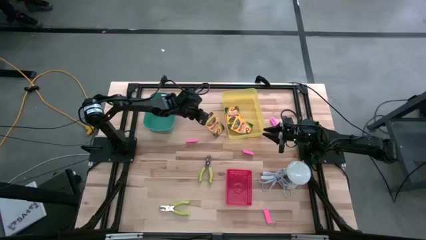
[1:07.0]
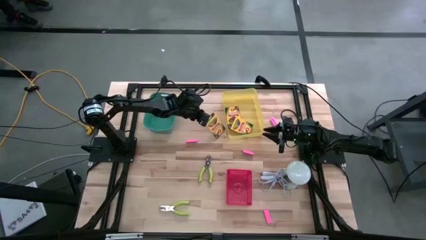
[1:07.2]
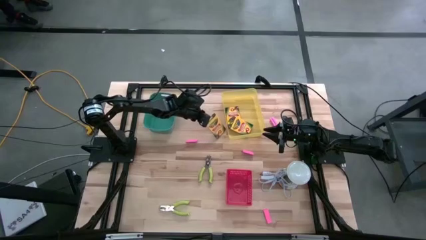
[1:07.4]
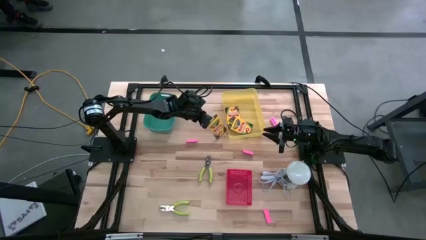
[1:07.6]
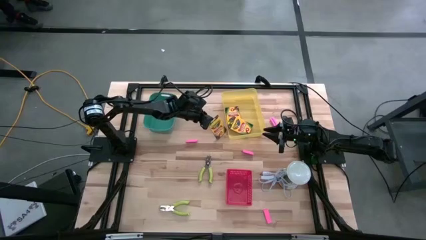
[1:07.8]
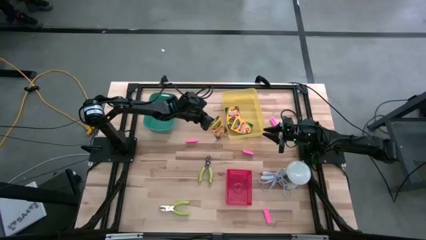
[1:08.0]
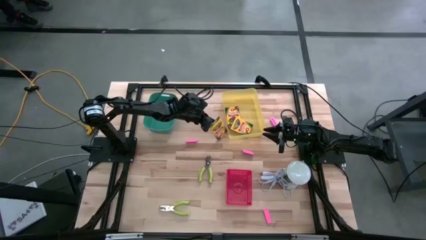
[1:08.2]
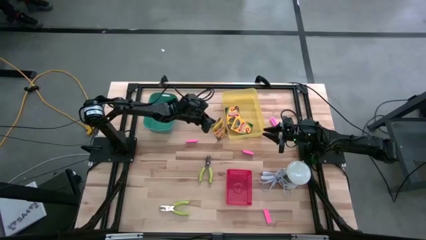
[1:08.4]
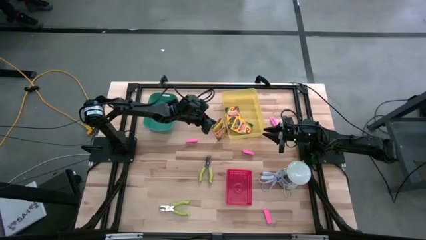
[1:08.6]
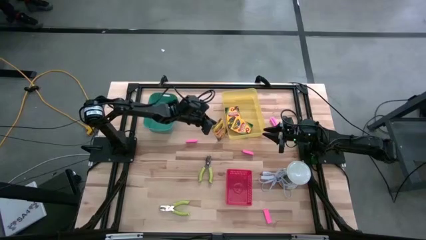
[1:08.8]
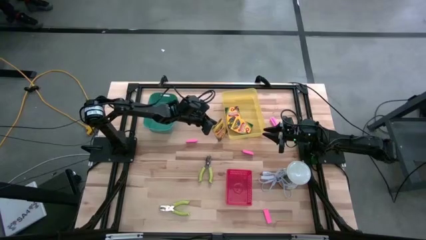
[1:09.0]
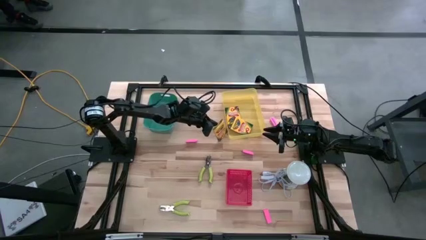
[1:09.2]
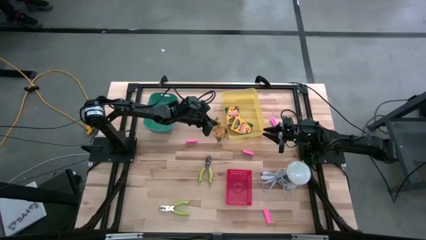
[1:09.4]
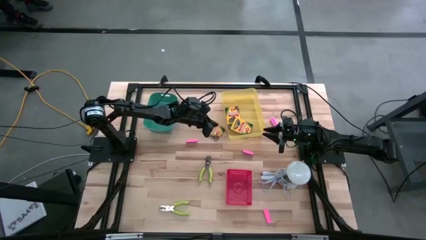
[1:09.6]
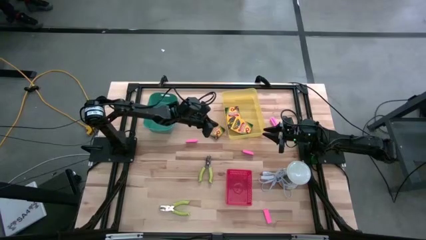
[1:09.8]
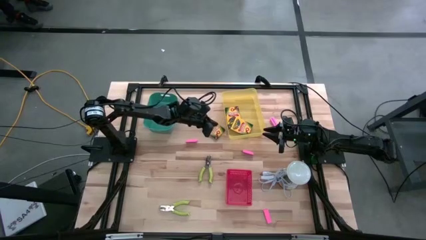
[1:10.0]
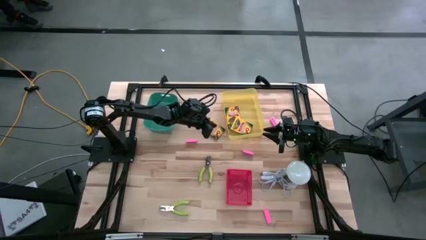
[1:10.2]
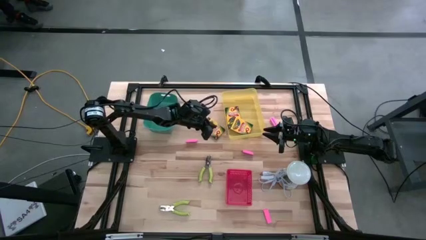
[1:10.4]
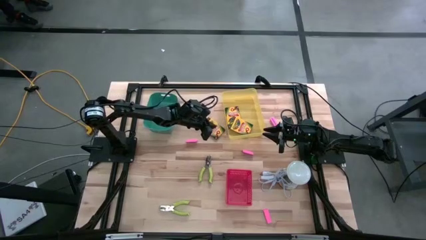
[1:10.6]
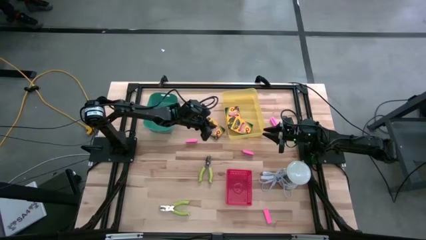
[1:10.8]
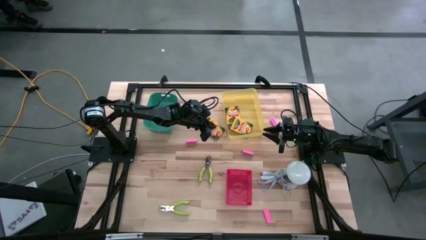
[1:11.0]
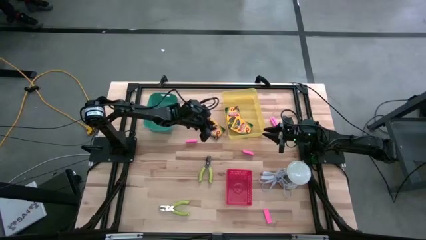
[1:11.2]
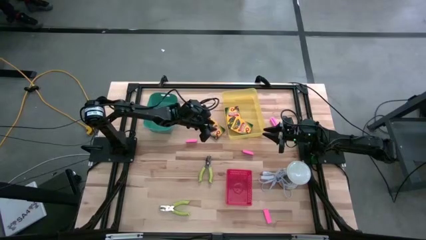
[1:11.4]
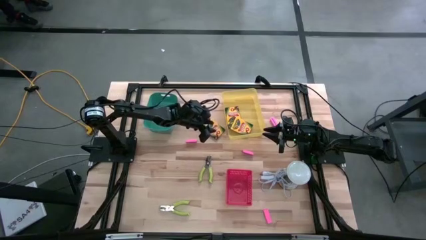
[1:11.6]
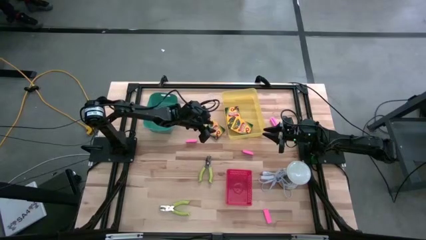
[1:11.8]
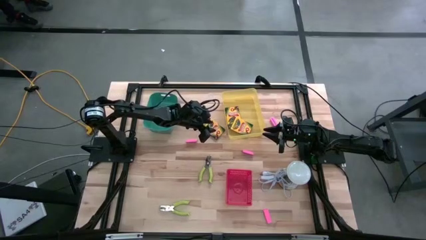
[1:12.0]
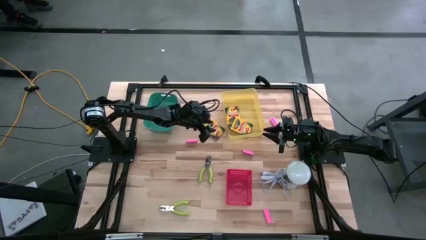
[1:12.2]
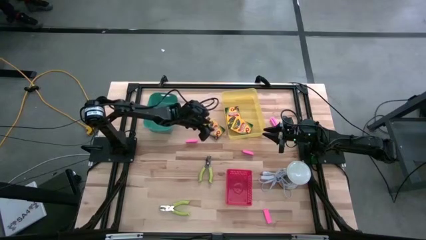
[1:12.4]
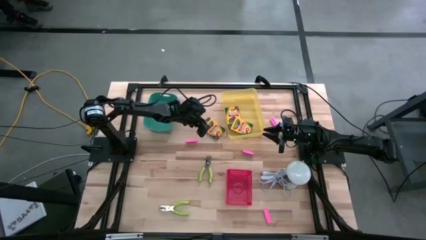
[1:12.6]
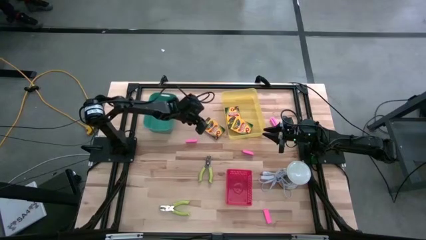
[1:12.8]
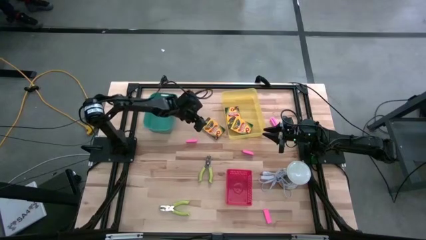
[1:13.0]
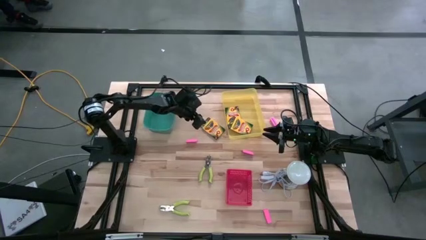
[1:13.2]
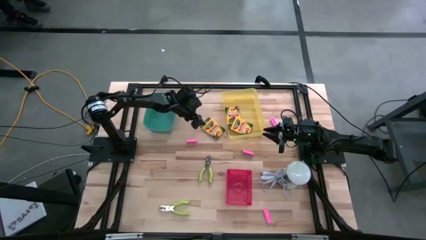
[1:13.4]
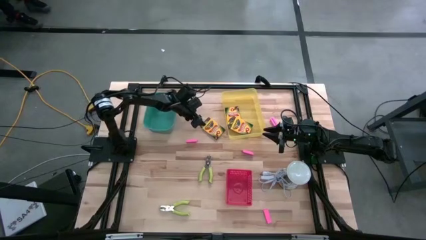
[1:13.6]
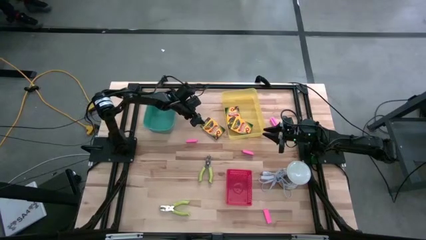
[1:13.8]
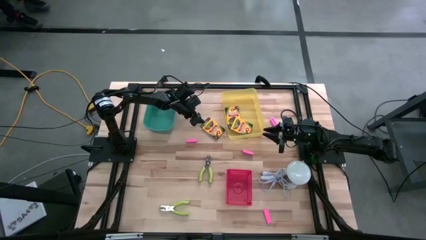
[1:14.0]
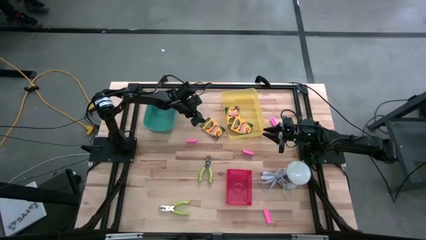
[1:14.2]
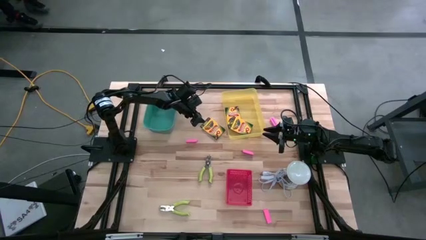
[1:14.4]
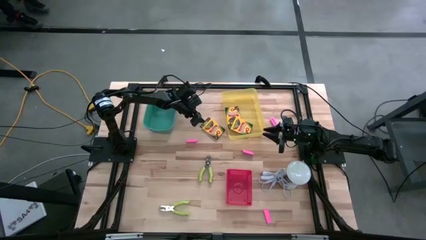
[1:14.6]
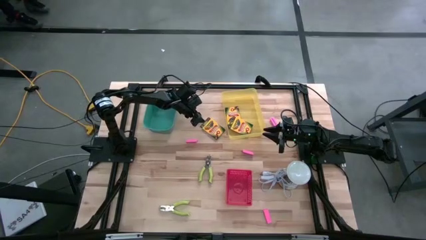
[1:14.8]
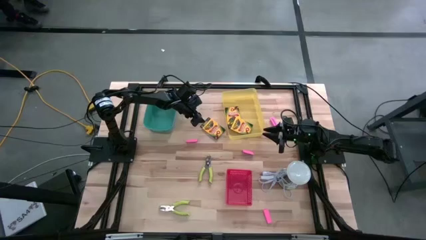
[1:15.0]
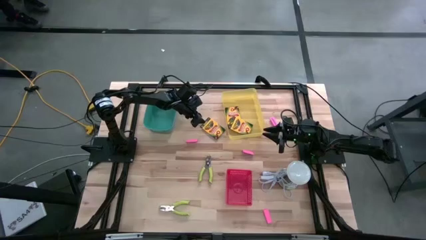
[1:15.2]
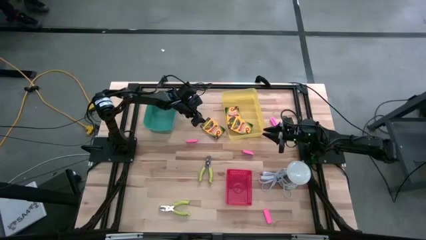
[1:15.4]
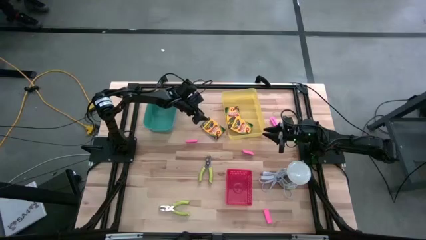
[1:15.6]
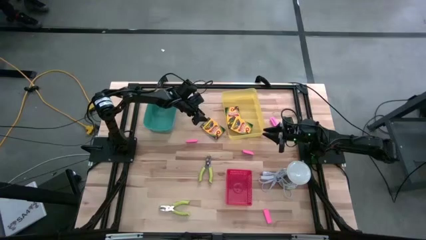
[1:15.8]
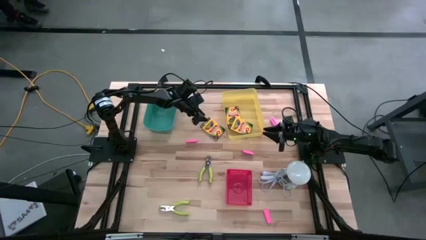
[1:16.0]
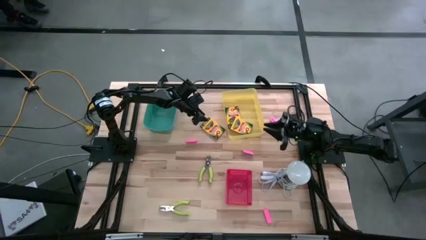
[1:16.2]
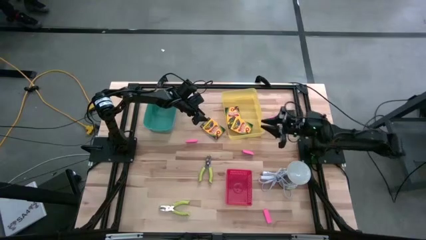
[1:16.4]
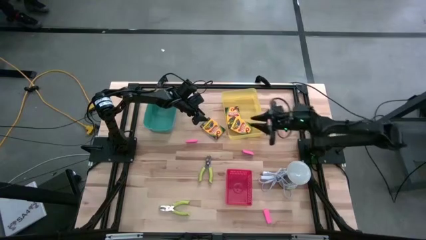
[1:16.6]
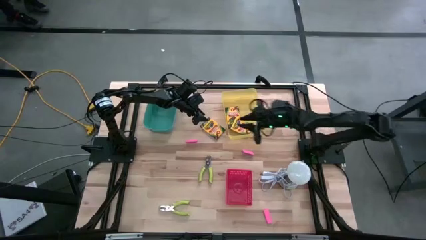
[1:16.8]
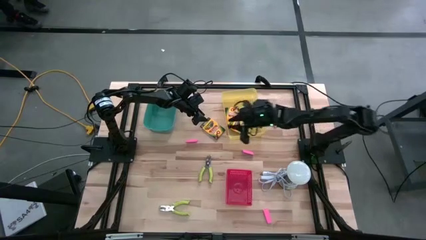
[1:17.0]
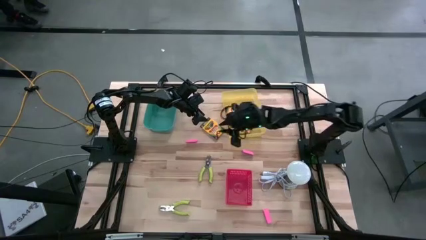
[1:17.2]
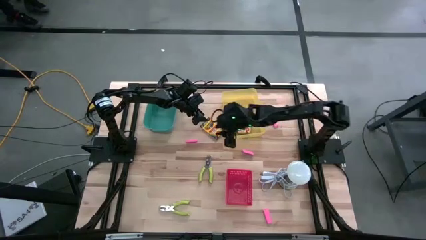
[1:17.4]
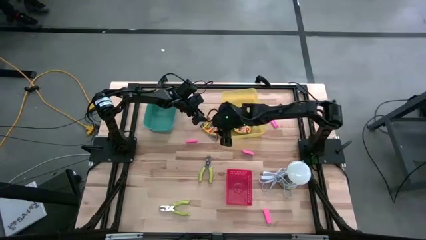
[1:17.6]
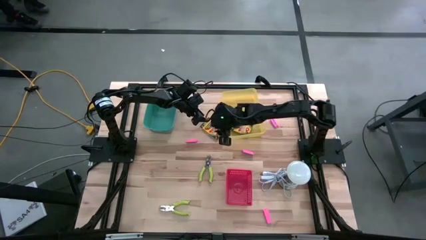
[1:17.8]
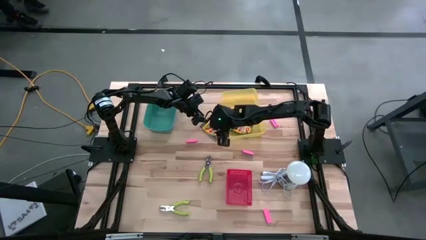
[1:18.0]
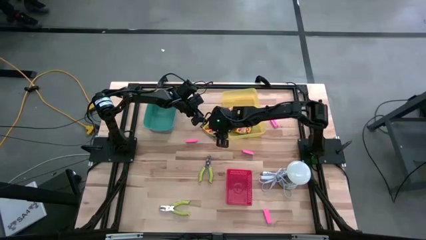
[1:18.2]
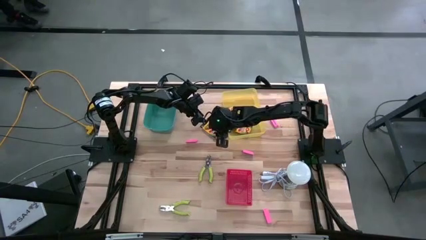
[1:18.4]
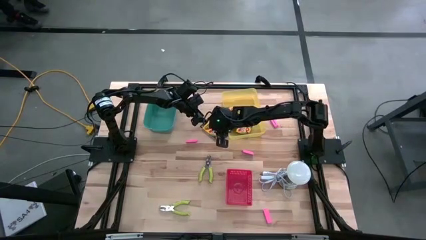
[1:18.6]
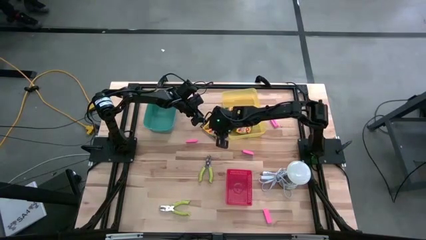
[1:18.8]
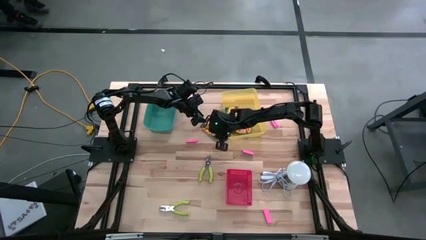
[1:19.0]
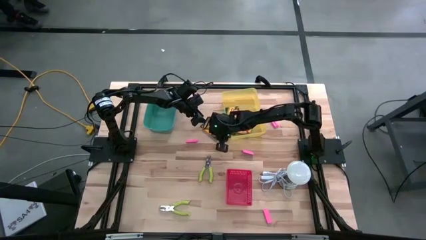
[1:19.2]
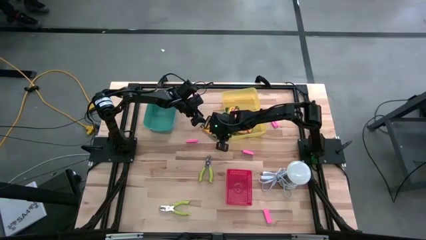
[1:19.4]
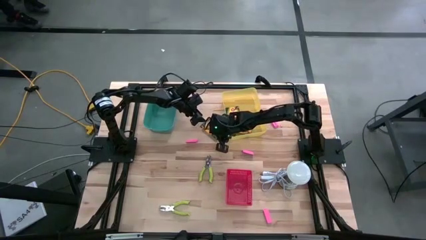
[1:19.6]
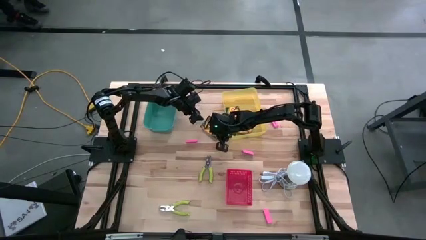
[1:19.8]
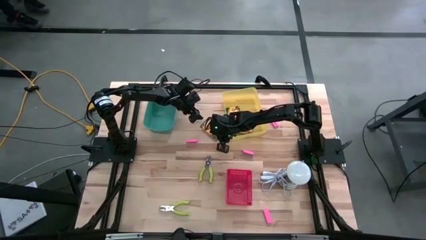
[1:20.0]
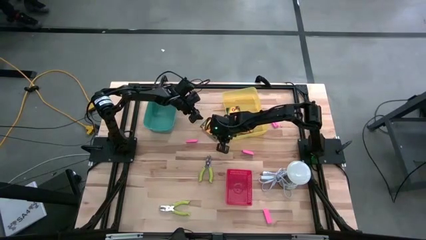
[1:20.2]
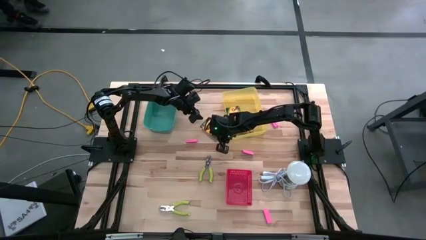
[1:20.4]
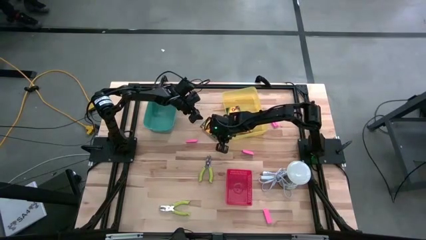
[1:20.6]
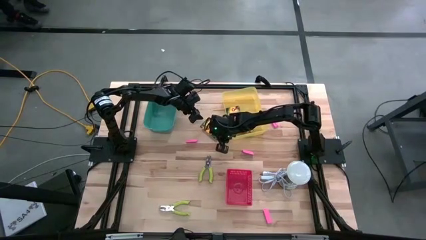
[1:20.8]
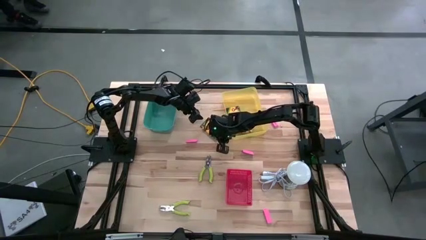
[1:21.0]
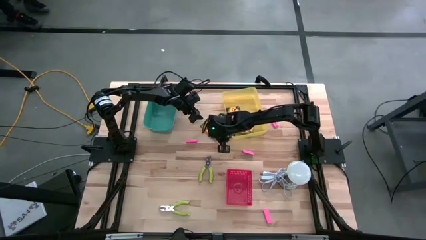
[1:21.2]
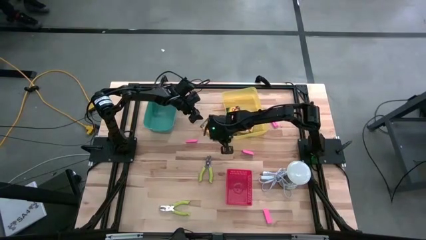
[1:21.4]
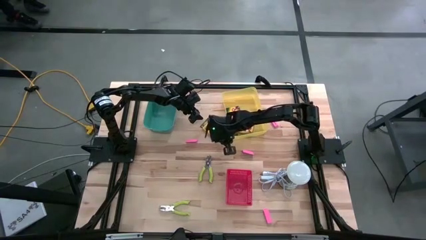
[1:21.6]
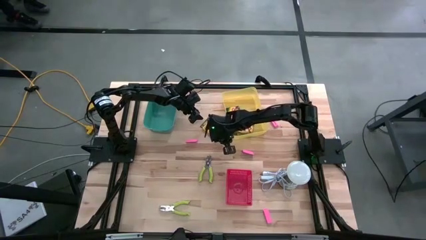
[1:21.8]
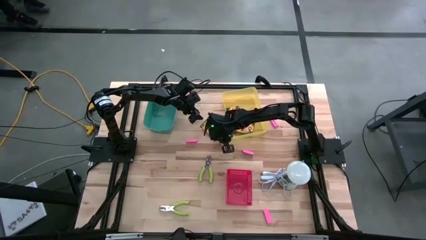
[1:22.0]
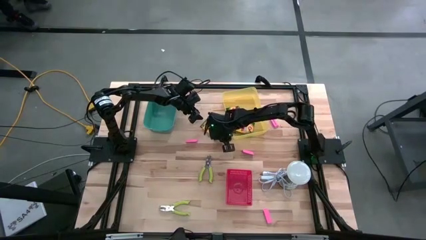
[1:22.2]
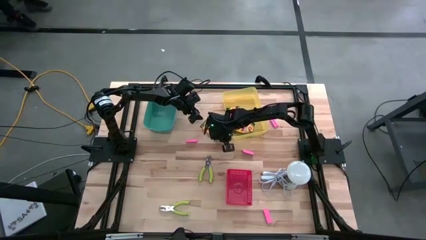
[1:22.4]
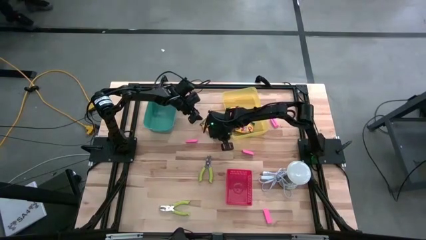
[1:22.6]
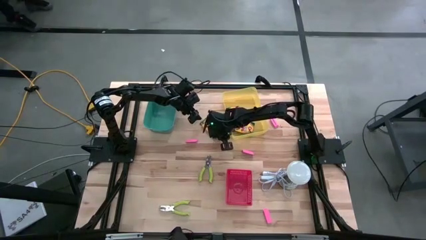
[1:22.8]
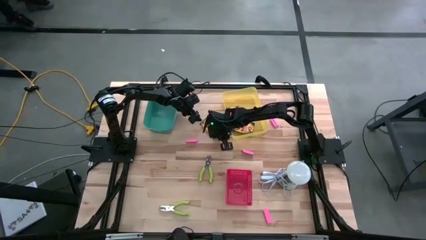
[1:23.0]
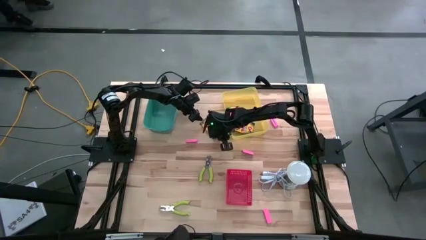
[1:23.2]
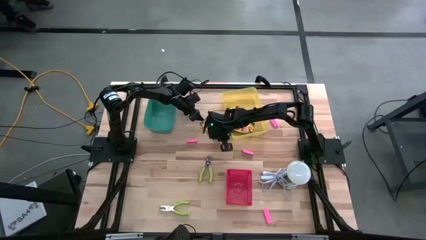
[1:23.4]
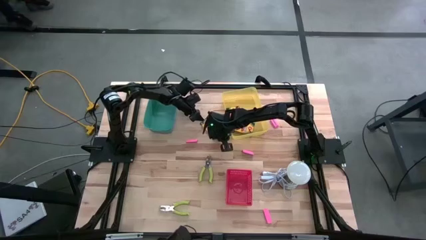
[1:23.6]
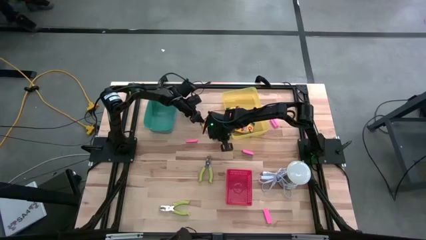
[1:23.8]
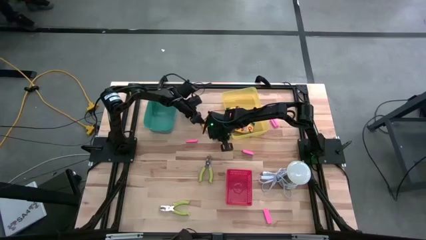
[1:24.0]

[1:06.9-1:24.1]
Task: Pick & Place School Supplies
Put the crayon box into the yellow bin
